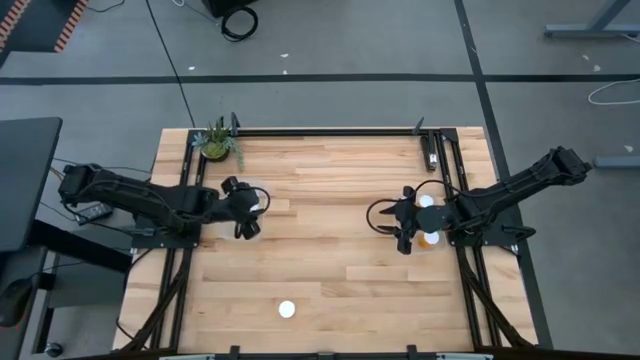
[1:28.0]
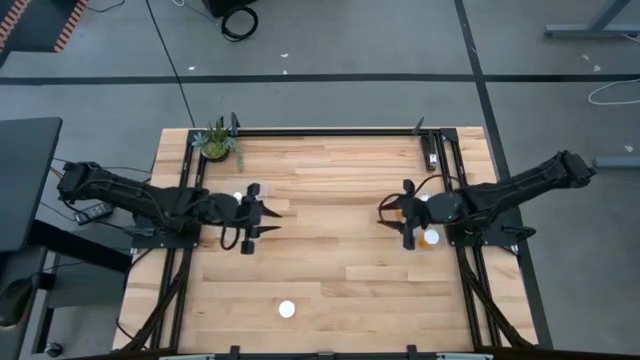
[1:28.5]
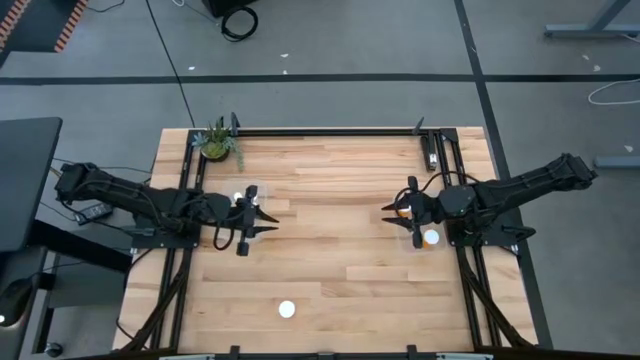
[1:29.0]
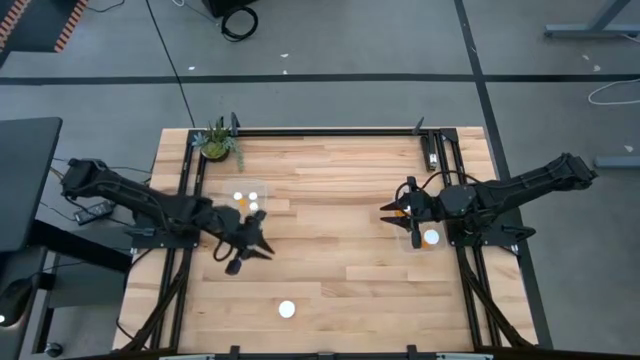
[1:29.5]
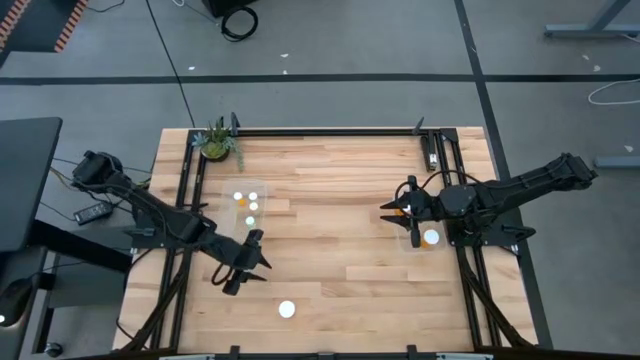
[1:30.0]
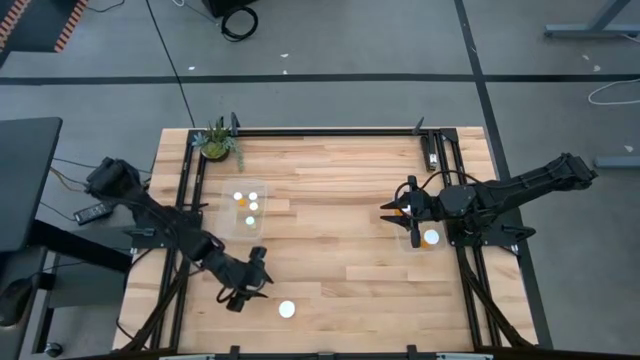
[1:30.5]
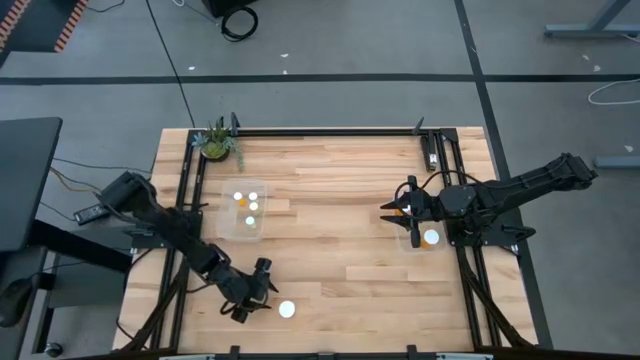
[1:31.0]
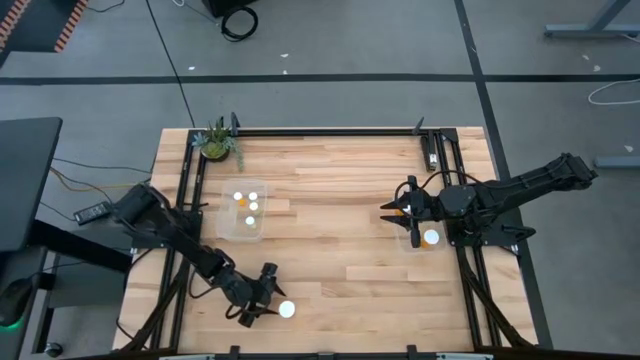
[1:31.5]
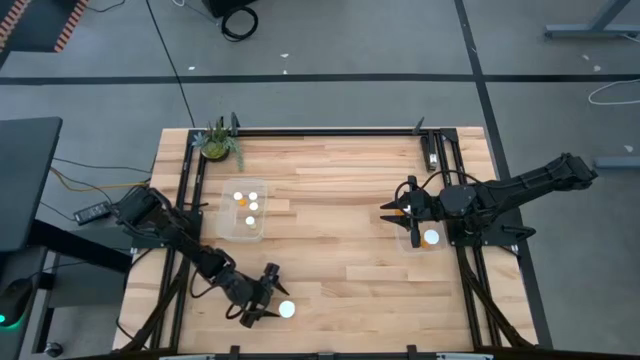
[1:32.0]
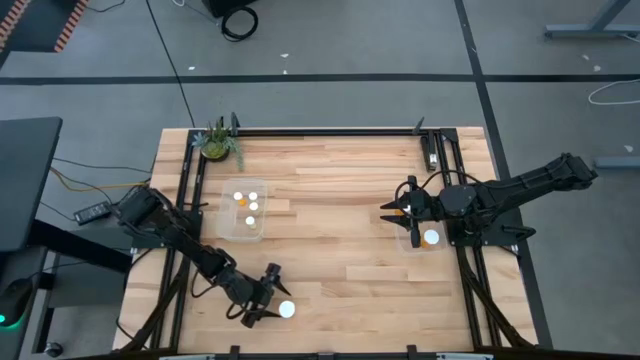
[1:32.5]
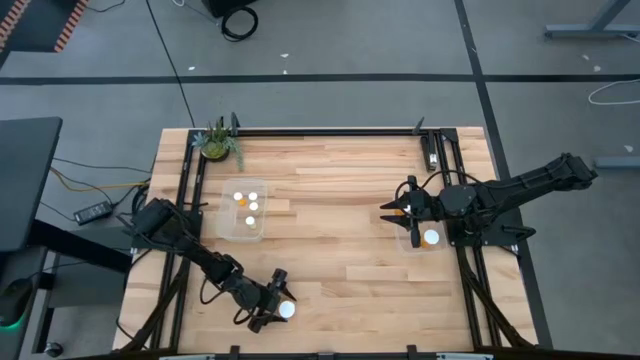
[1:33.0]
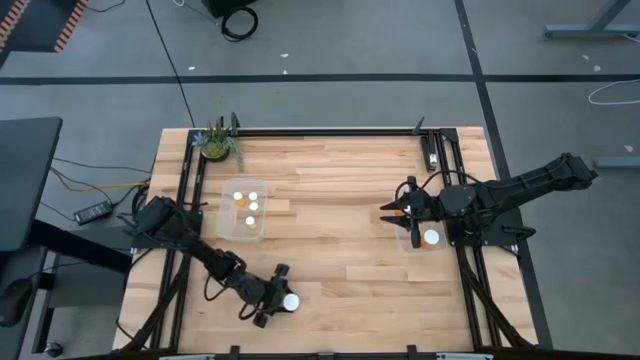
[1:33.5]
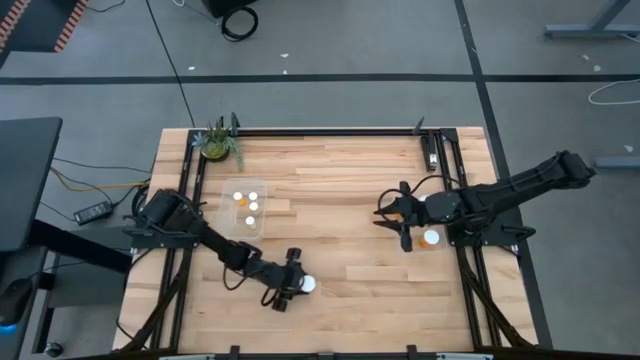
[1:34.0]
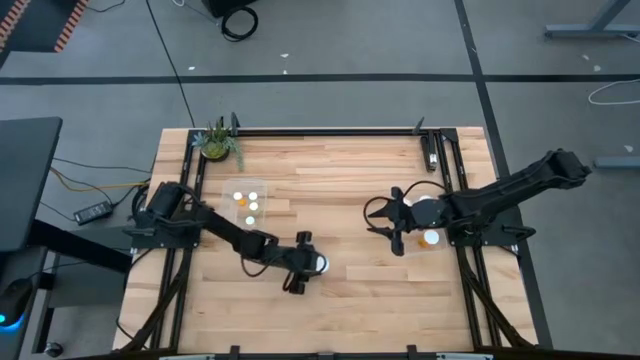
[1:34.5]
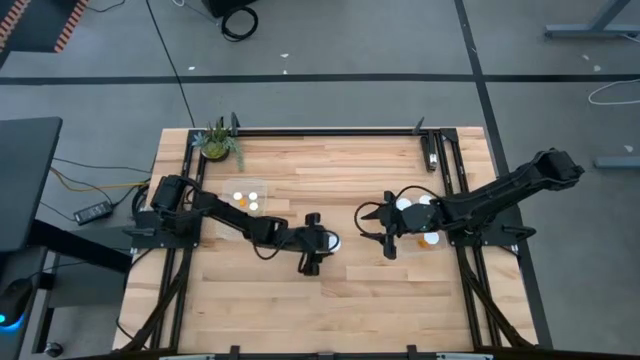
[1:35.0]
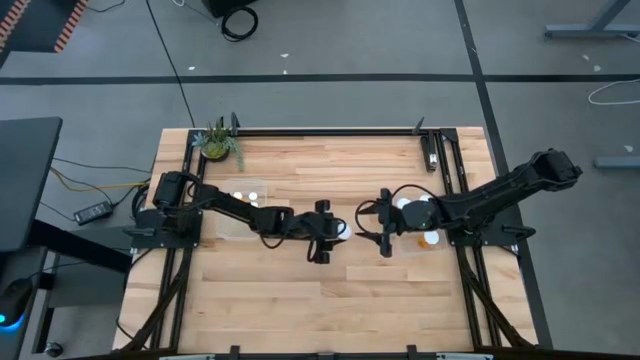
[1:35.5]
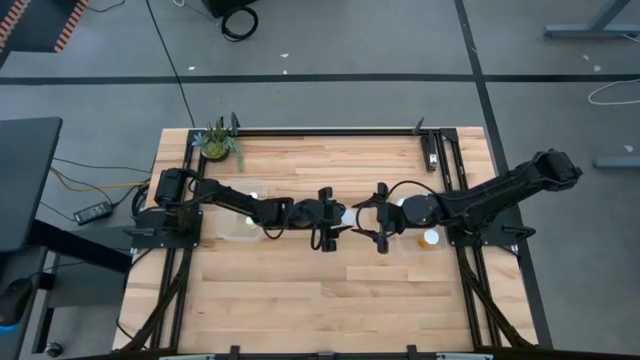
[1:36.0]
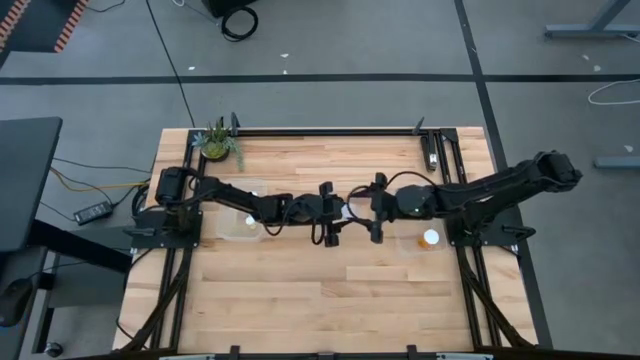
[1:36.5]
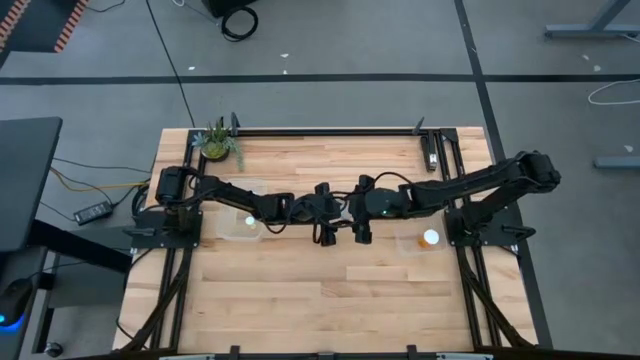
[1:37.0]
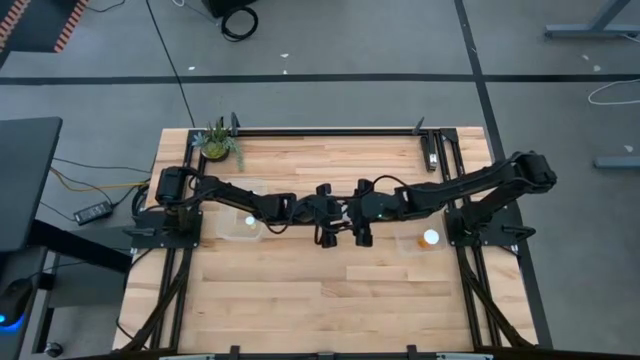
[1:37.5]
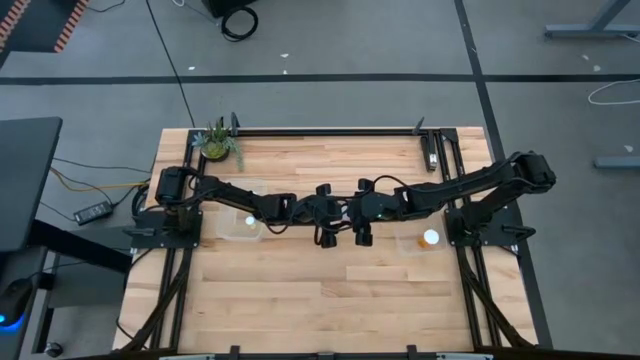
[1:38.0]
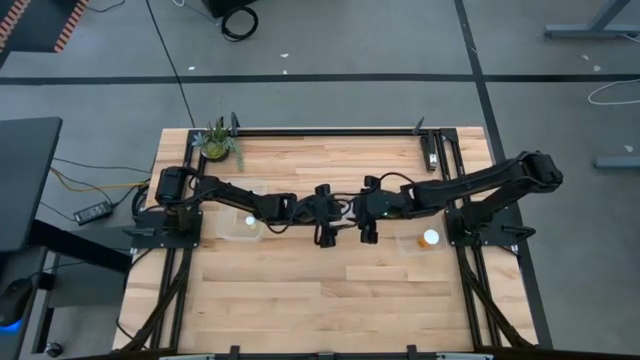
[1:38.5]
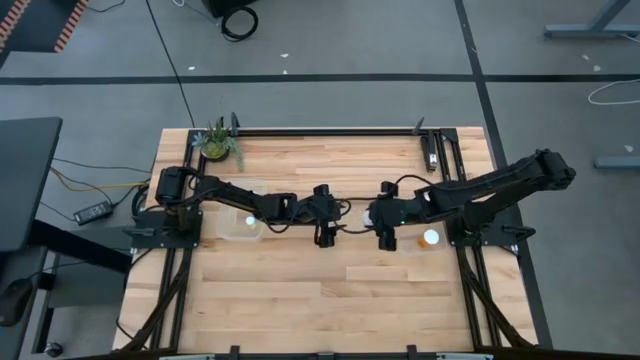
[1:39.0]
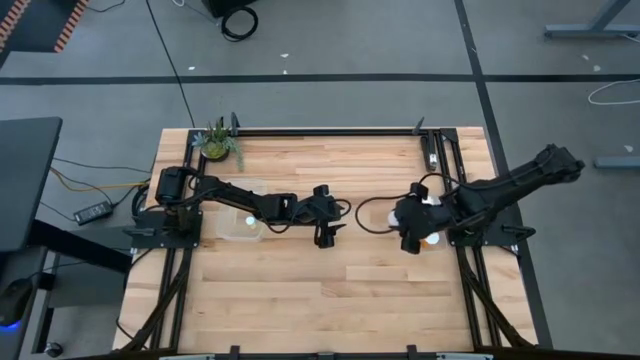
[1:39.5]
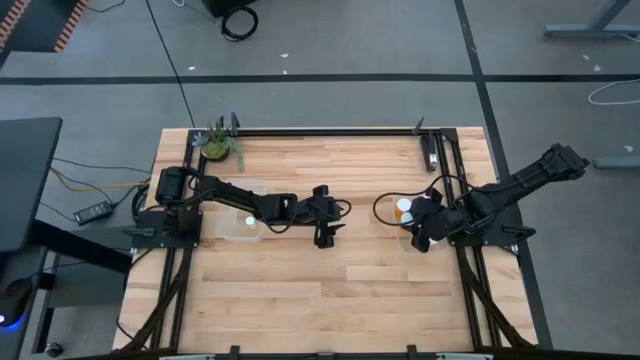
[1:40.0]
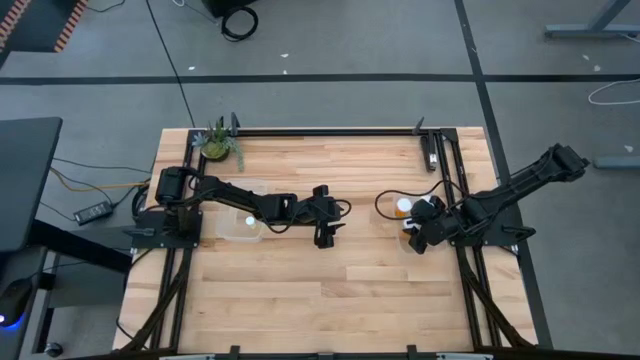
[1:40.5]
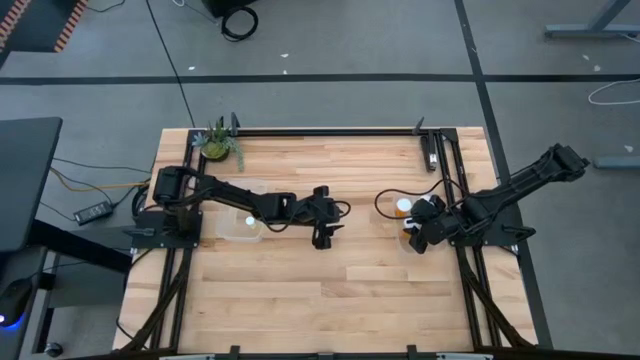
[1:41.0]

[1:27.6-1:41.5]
Task: Pick and place medicine bottles into bin by pill shape (circle, oval)
Put the large orange pill bottle into the right transparent bin

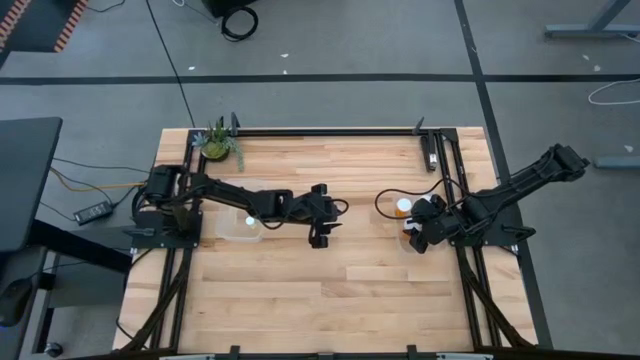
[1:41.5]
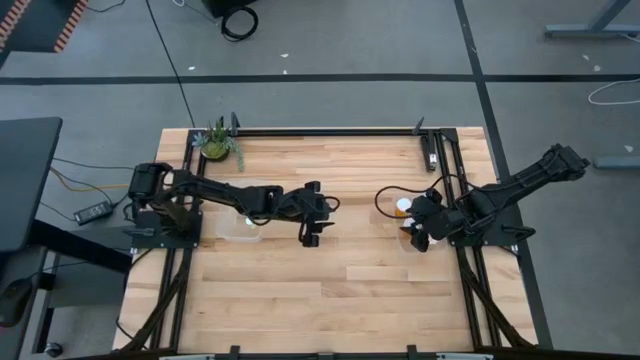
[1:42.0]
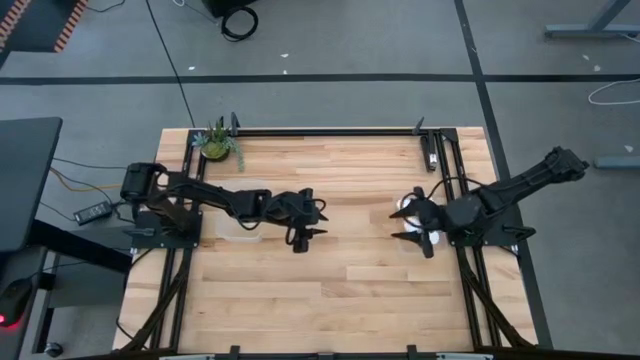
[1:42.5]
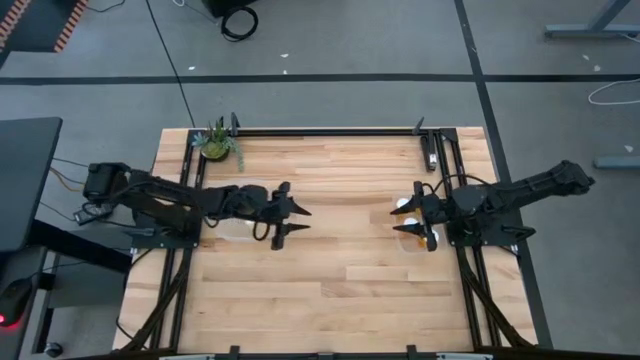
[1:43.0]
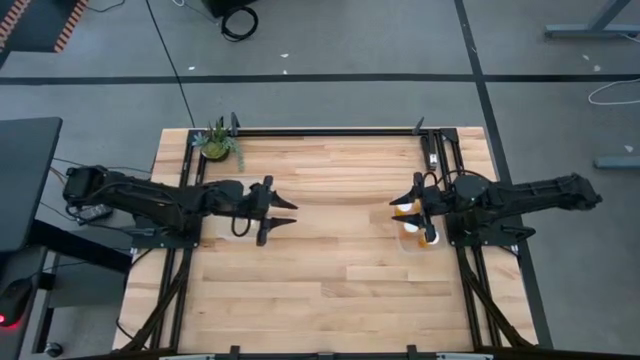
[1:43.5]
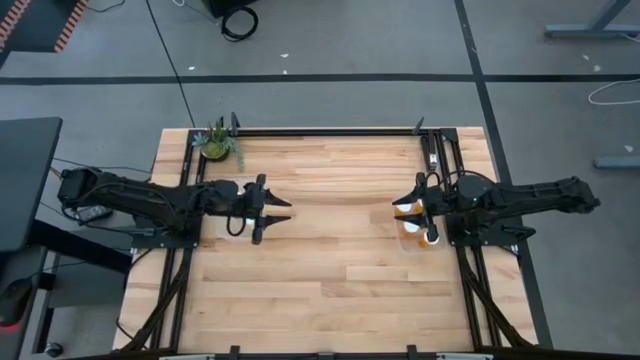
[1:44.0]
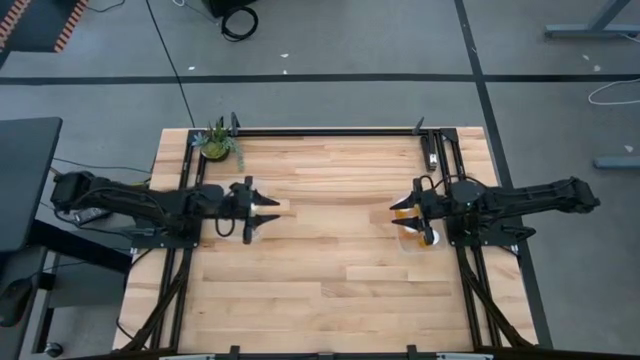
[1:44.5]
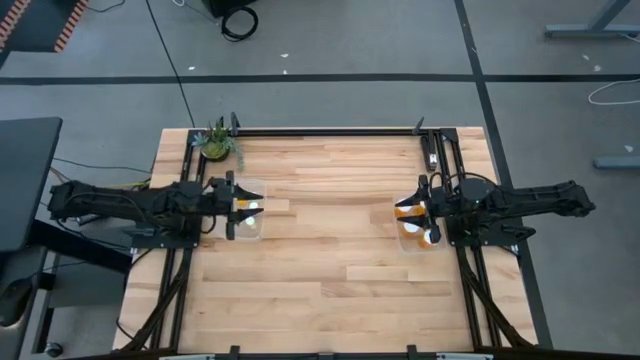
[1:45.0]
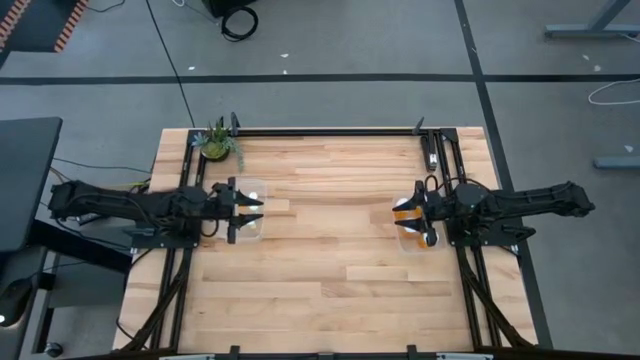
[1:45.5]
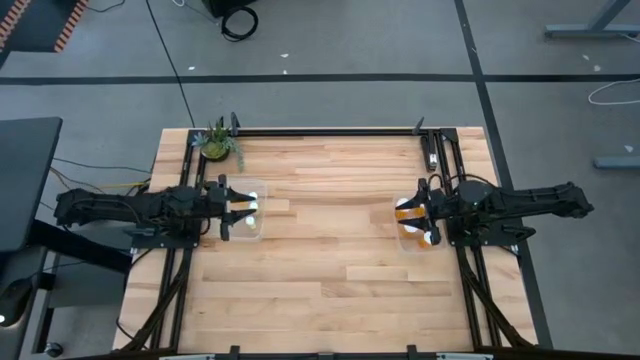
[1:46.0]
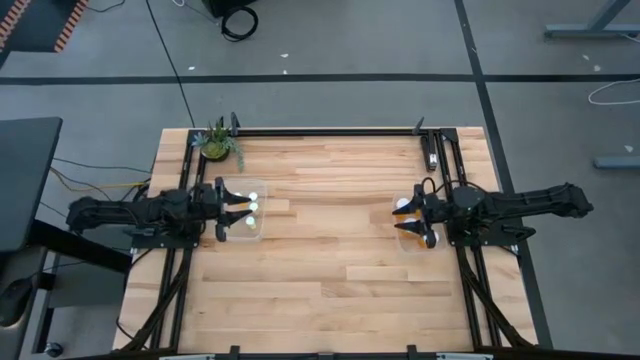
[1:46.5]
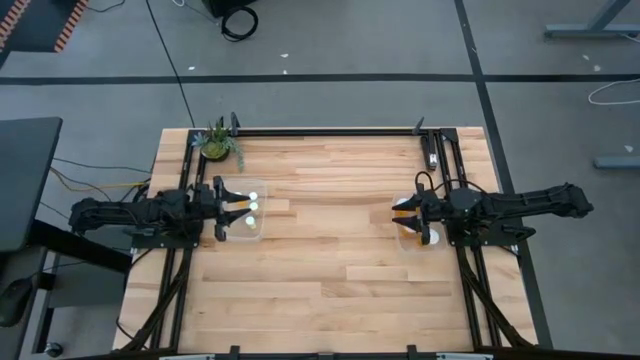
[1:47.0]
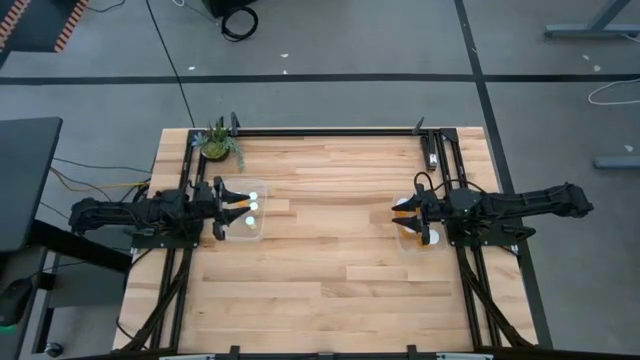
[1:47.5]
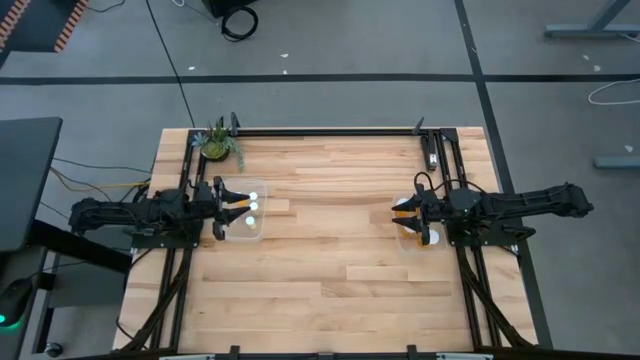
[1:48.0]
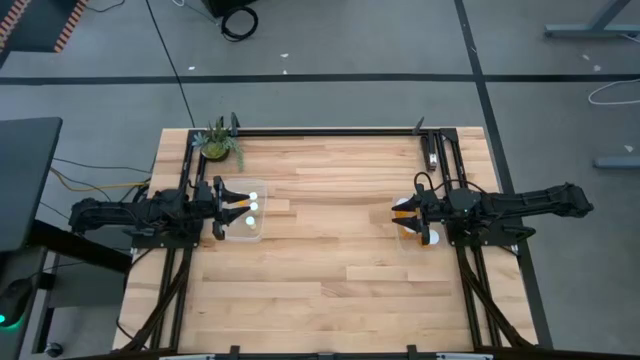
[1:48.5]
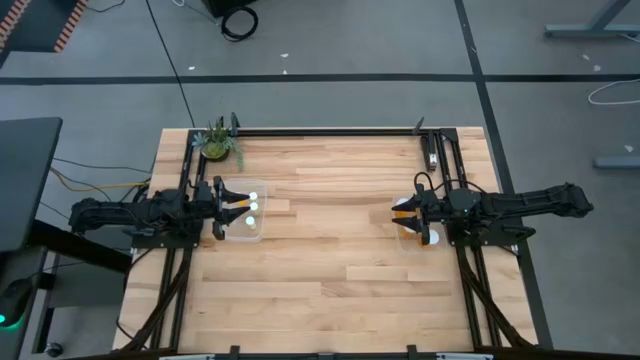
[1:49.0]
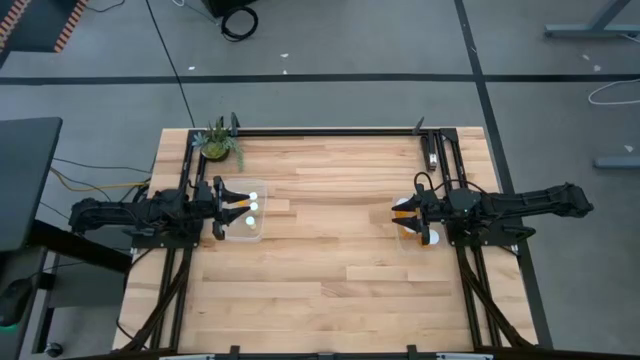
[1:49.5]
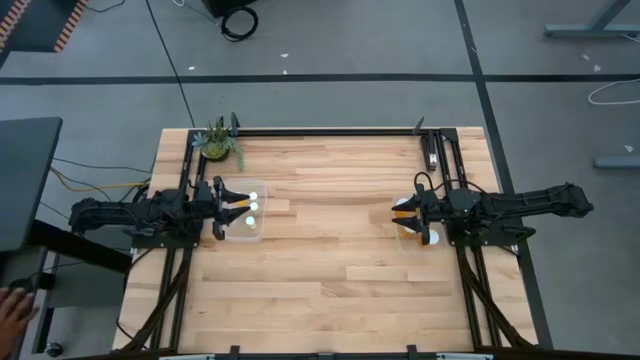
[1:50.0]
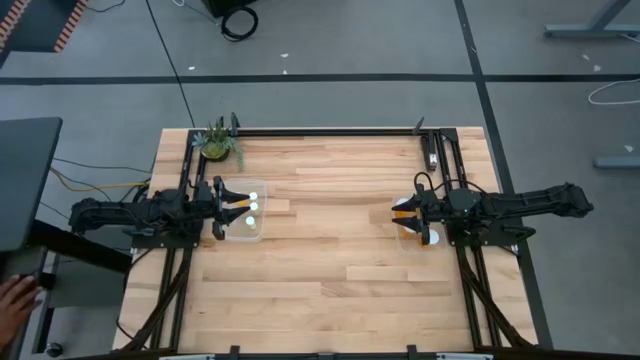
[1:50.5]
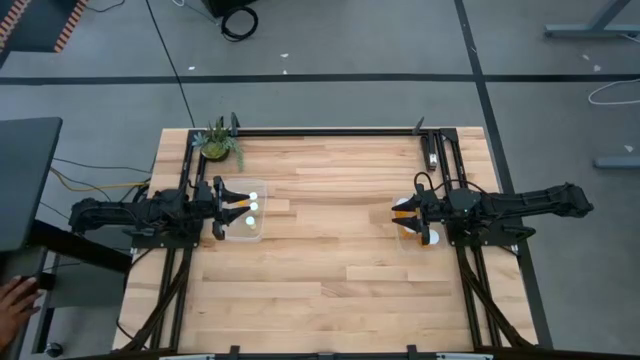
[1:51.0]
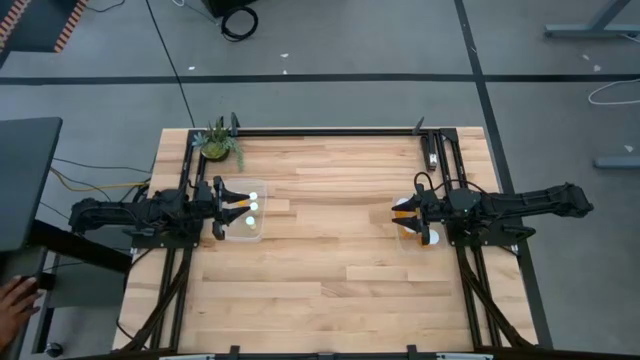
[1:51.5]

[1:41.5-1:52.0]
Return to Home Position
